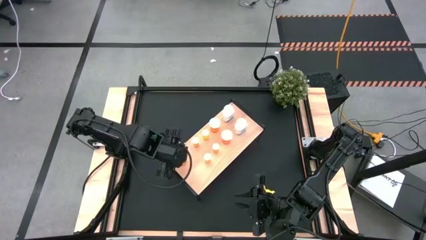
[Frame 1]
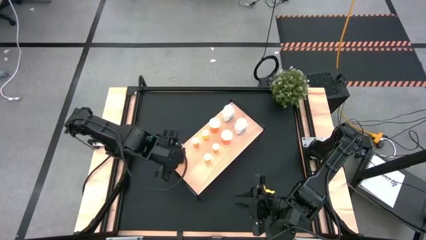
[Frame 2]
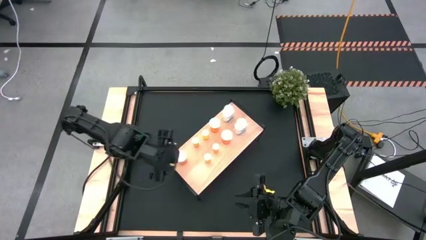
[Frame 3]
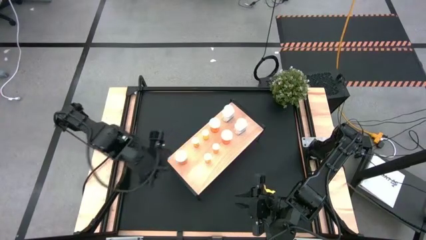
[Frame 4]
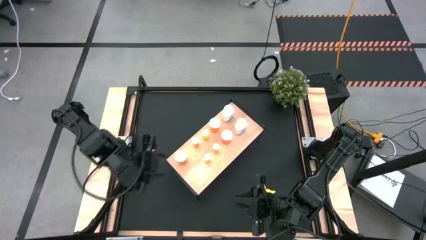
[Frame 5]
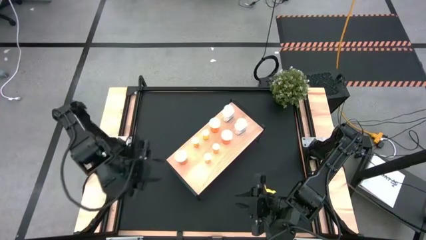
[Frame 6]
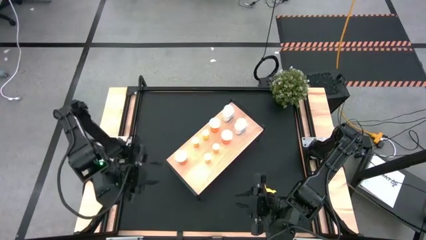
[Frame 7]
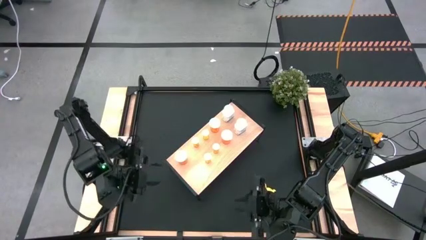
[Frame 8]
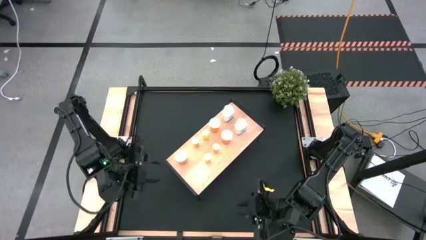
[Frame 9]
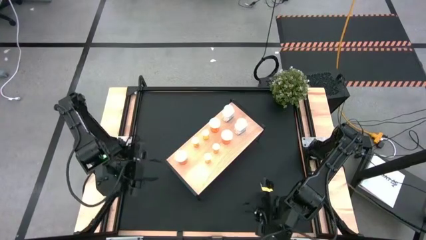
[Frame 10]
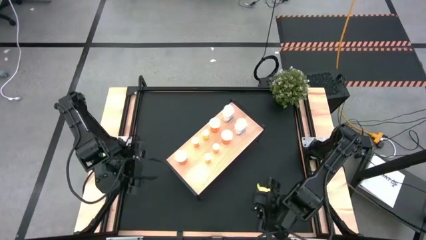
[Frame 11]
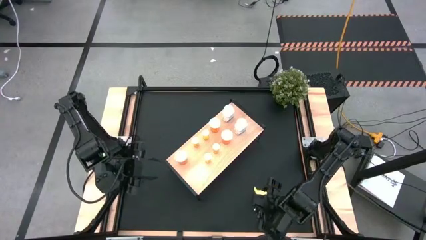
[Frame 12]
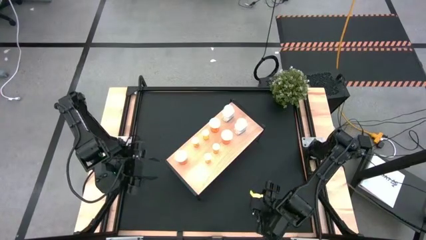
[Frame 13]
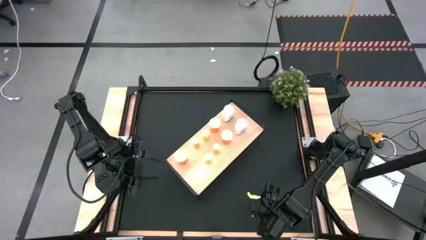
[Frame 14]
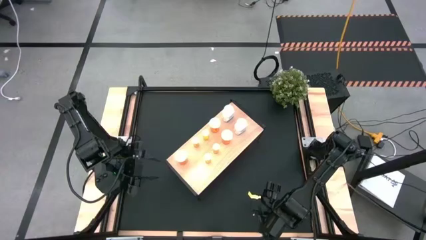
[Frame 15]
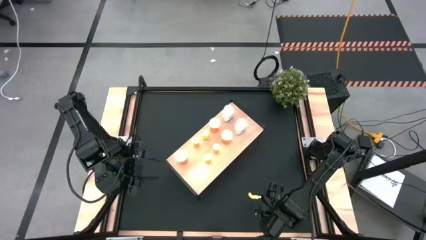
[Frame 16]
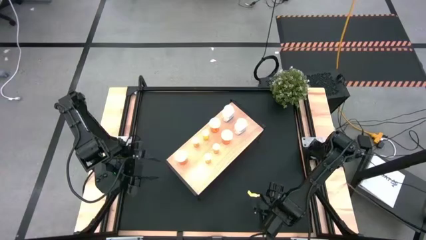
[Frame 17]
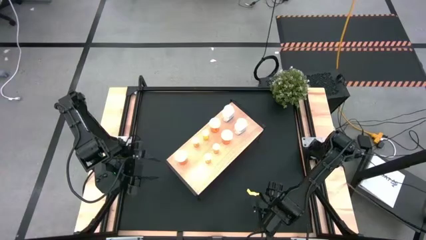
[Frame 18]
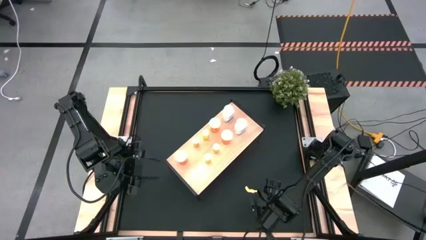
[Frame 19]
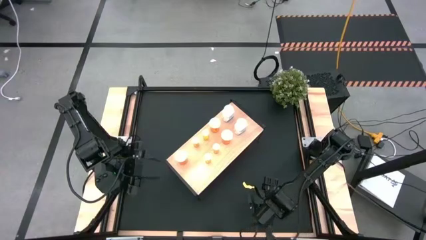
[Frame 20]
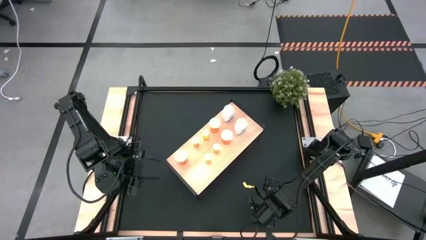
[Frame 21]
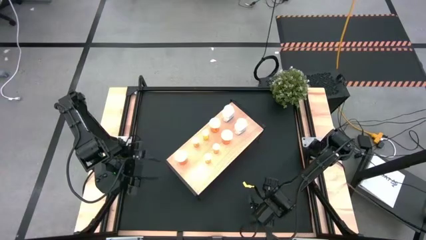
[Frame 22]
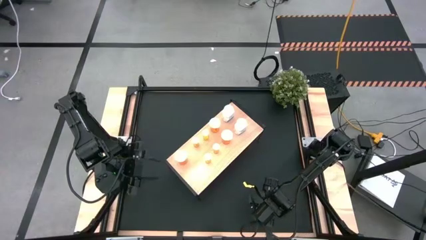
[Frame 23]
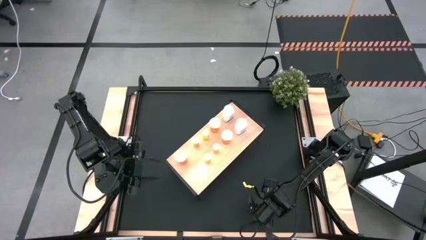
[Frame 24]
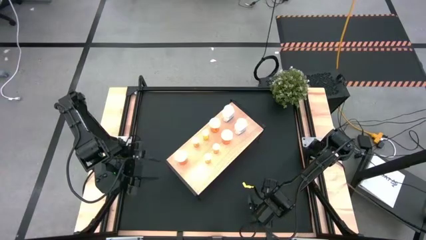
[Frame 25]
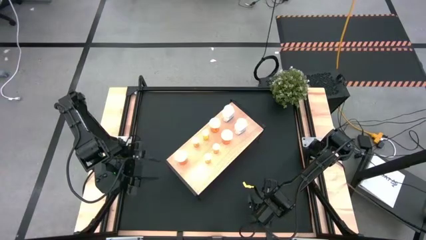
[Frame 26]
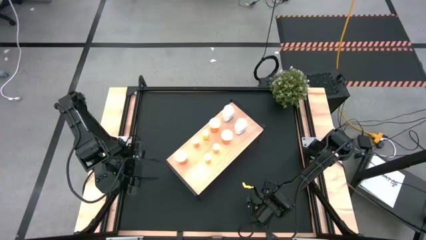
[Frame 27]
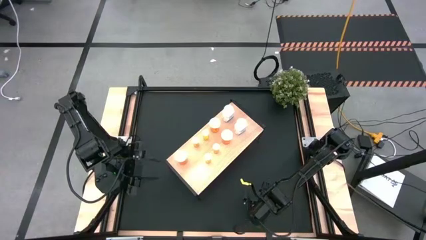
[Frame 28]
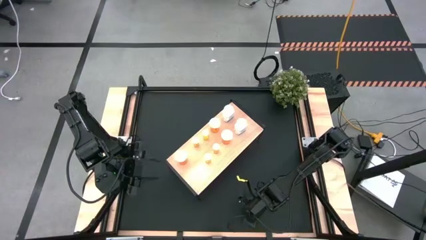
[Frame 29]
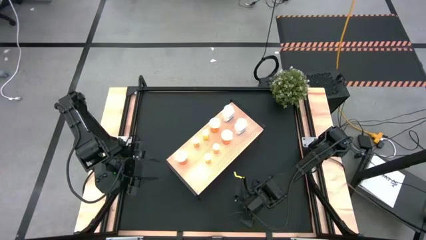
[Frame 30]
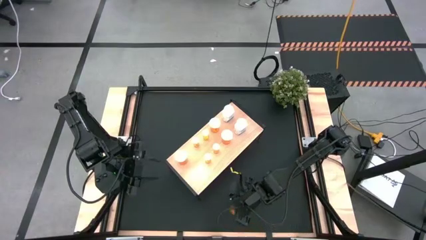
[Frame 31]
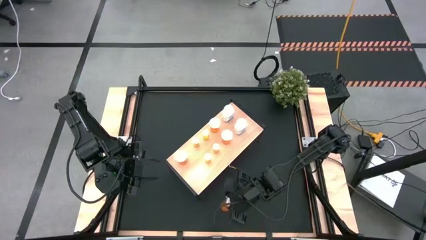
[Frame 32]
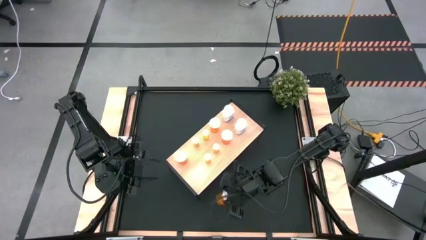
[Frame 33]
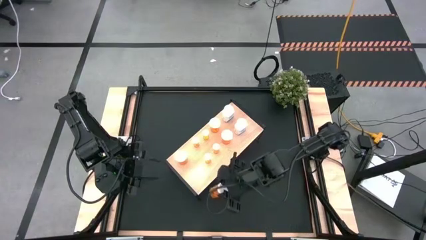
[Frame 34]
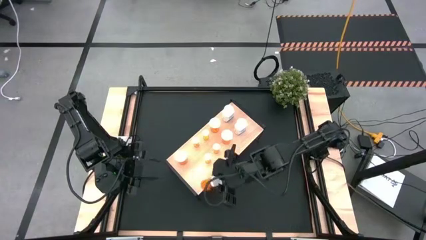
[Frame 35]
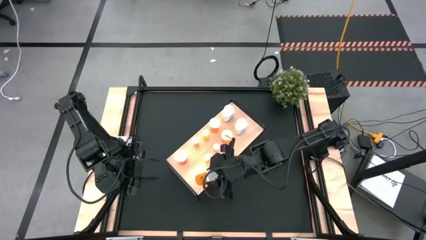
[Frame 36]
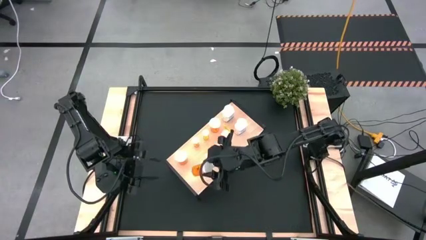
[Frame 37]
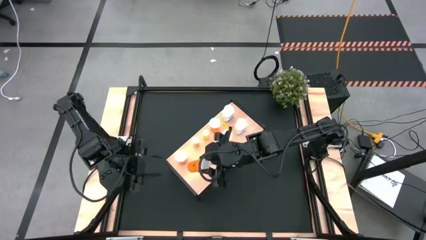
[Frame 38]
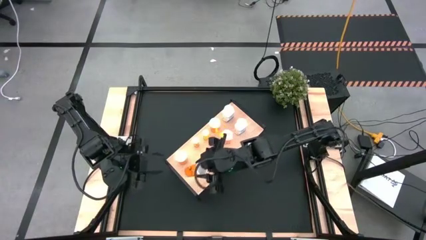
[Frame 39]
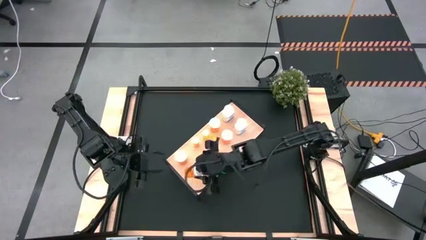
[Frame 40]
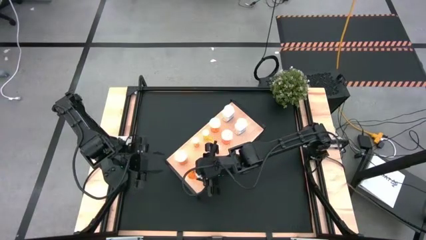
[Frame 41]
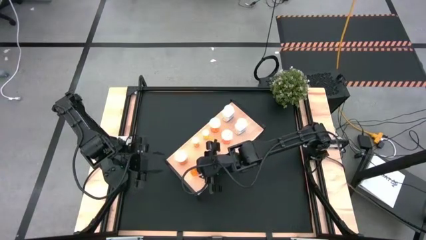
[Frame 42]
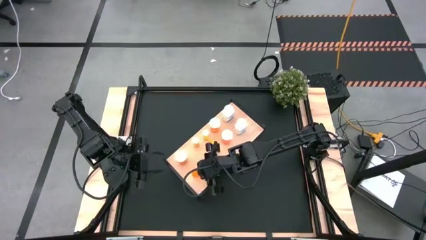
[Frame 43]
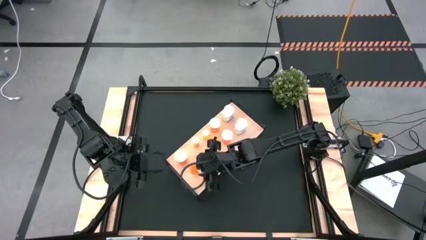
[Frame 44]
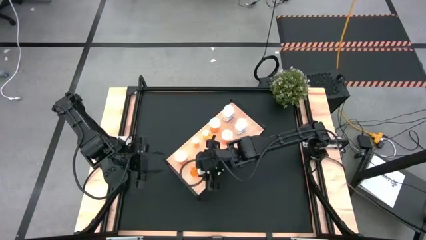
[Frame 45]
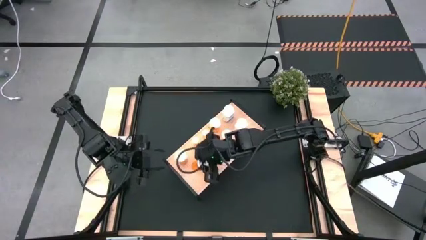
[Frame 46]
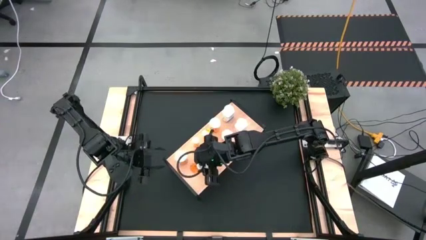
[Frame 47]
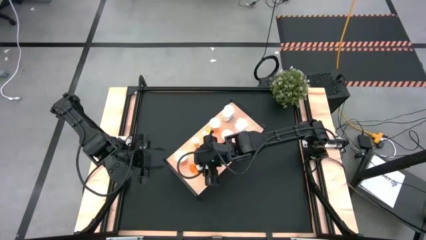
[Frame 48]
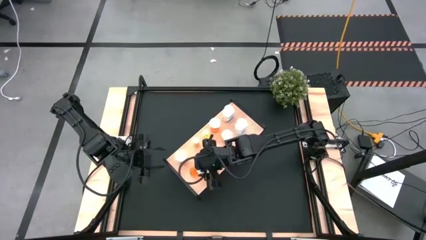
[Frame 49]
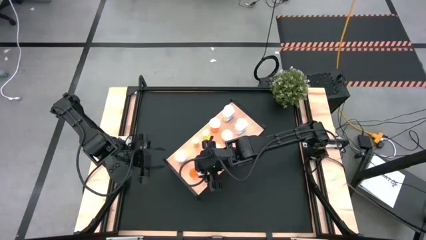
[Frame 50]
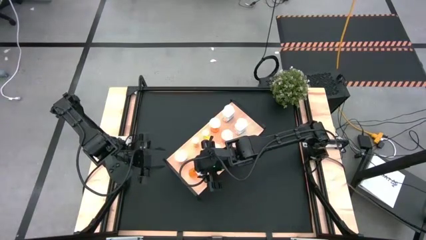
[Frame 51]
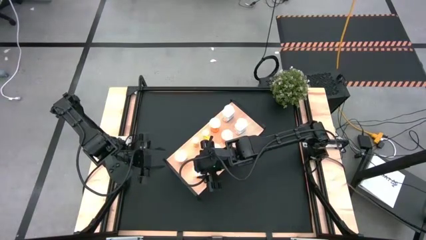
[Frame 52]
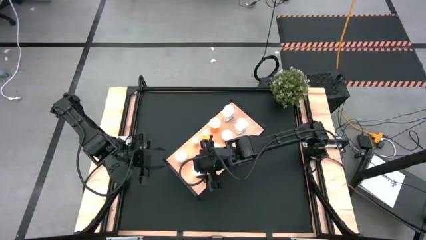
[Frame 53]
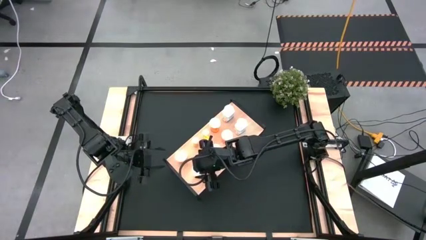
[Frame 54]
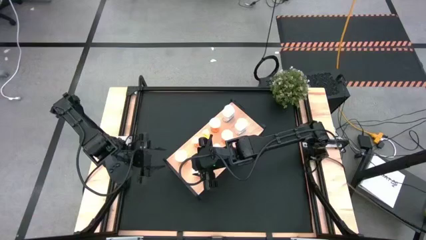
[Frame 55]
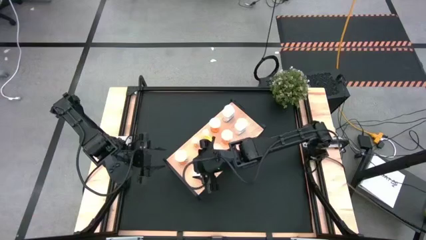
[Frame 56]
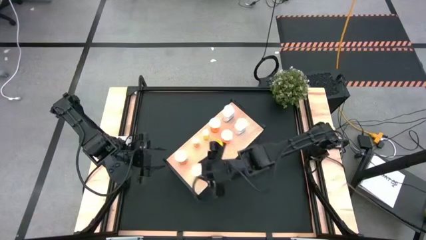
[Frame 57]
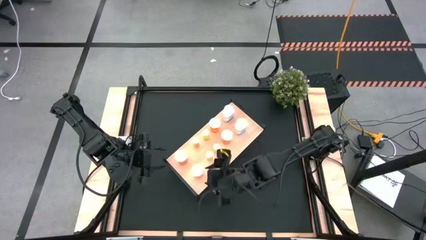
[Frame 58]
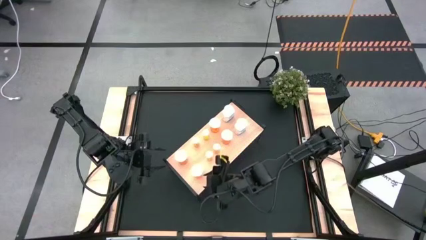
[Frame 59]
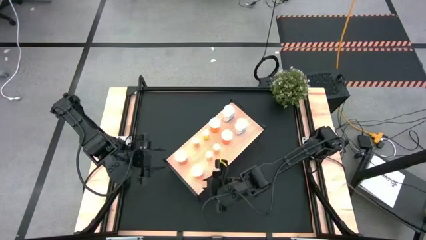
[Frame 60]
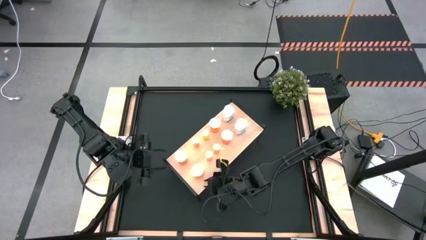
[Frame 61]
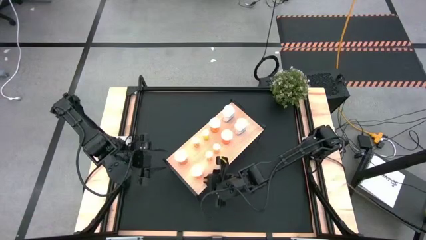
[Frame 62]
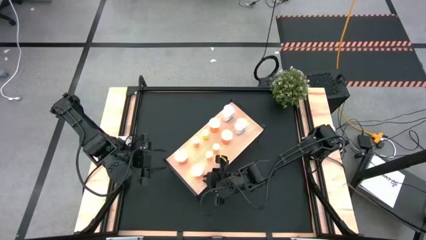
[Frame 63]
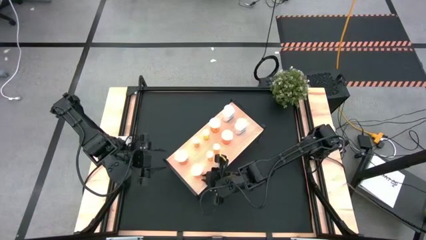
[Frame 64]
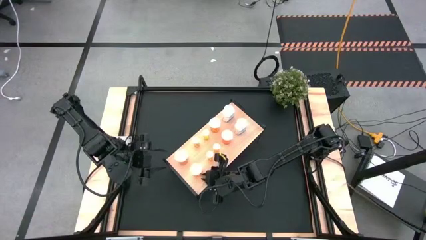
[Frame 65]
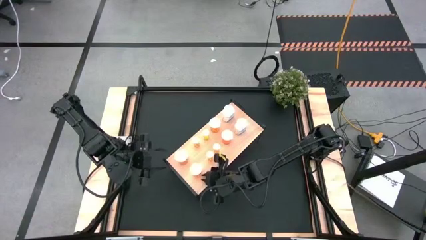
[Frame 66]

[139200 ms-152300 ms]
Task: Pick and place medicine bottles onto shelf by color
Put the large orange pill bottle on the shelf

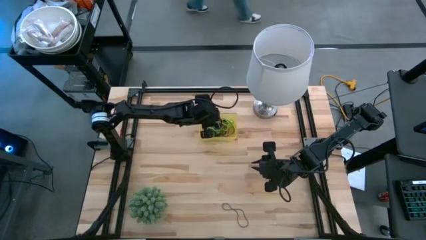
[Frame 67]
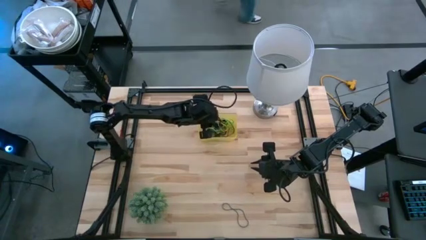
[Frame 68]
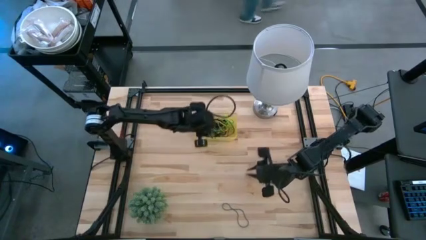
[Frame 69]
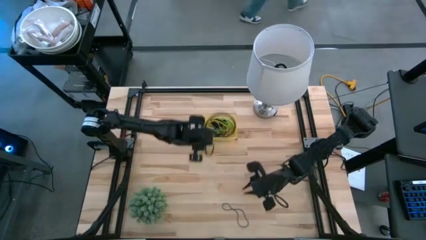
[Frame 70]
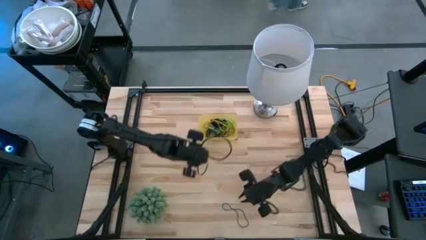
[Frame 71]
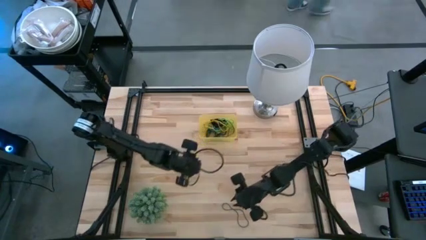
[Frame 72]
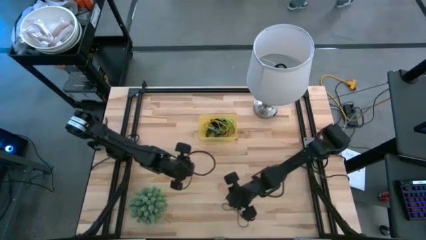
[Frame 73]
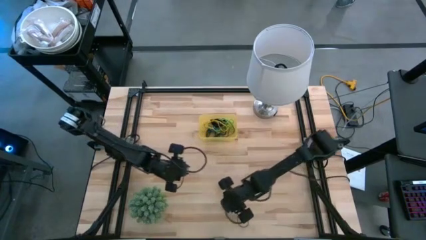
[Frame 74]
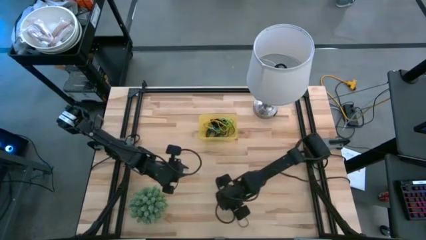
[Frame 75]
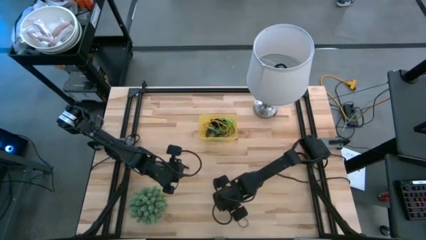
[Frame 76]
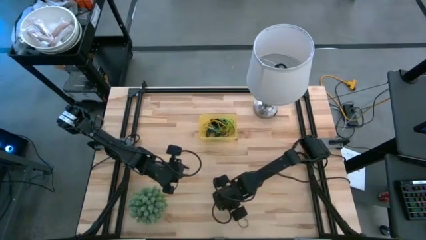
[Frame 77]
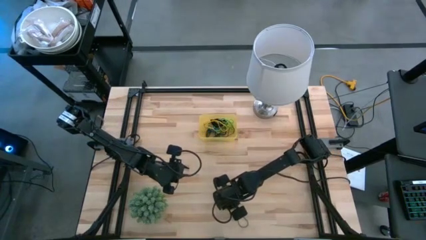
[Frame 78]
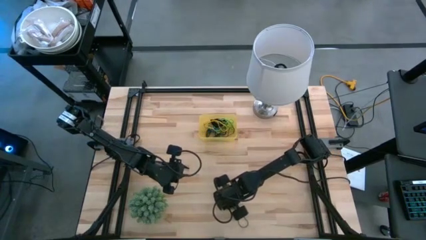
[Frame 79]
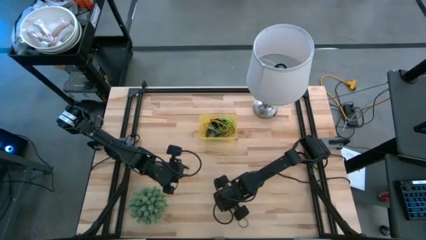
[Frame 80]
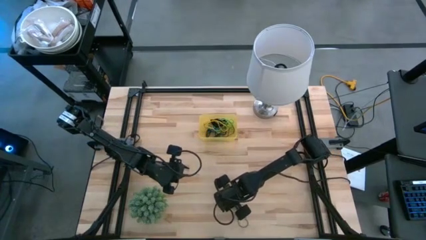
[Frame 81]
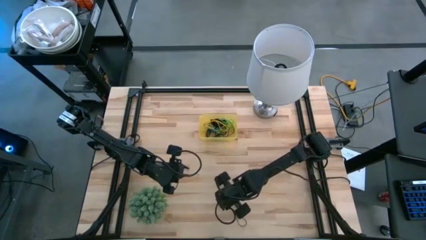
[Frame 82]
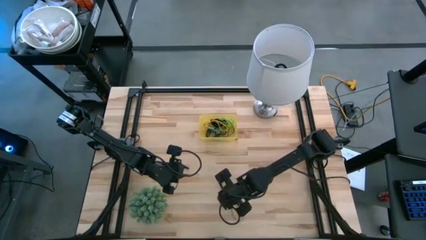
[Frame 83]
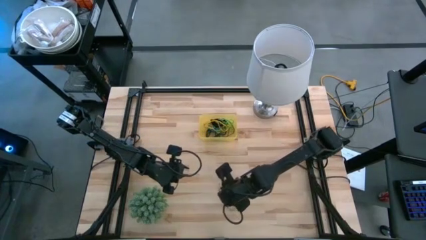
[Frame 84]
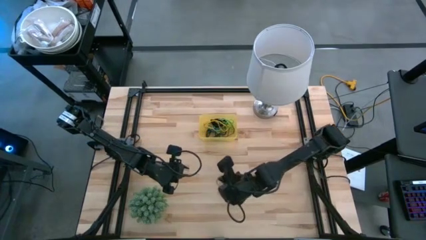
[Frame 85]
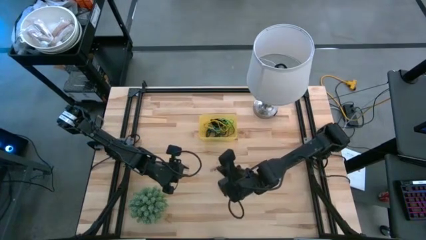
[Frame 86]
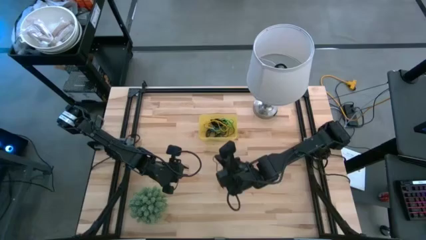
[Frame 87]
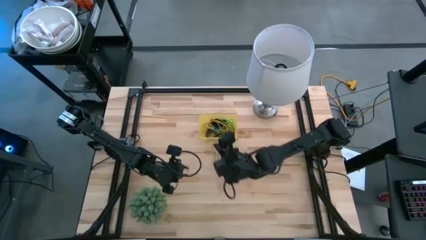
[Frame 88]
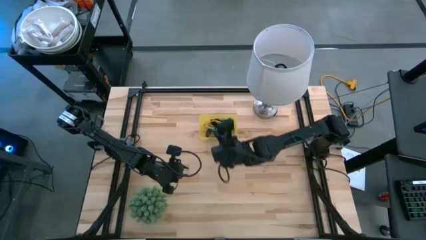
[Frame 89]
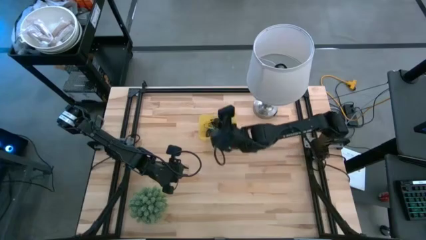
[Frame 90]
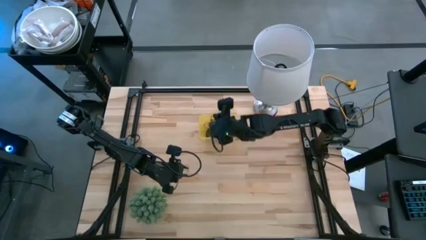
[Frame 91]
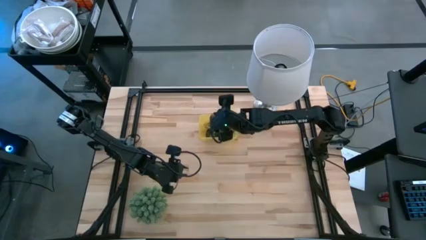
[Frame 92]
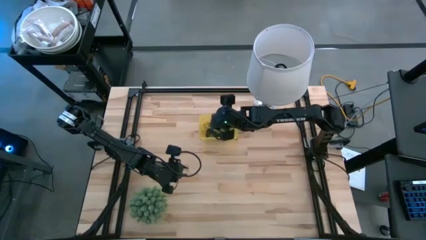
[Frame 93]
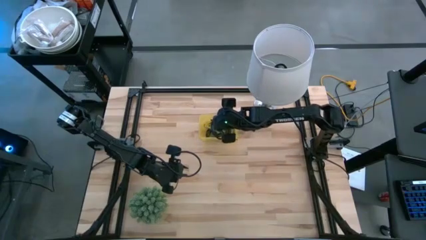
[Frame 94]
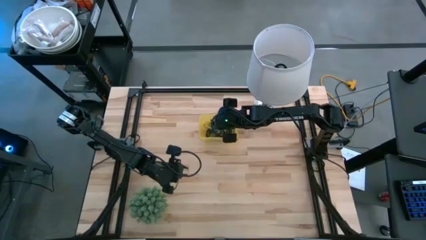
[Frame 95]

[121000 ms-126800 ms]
Task: Pick and place rubber bands into bin
Put the purple rubber band into the yellow bin
